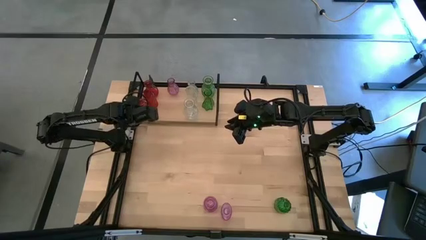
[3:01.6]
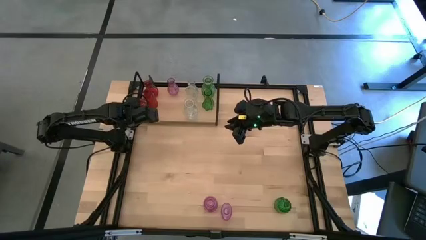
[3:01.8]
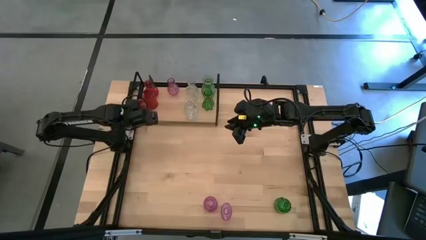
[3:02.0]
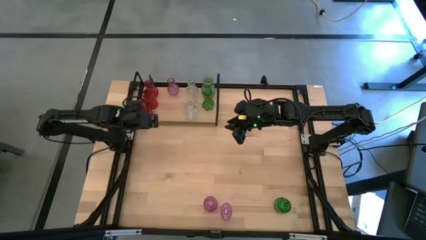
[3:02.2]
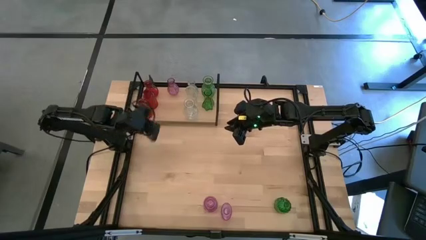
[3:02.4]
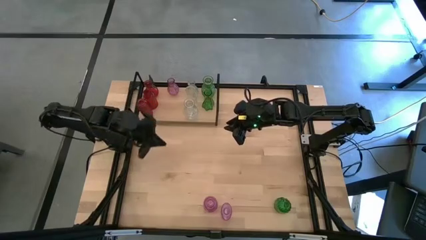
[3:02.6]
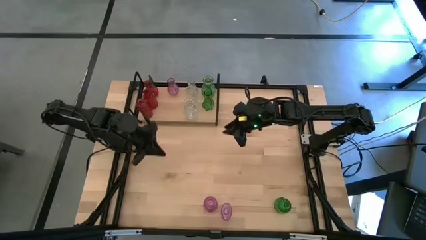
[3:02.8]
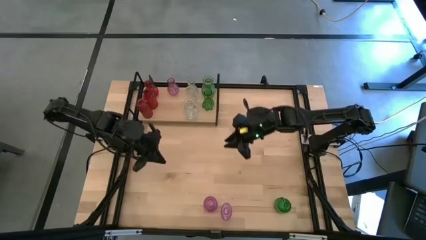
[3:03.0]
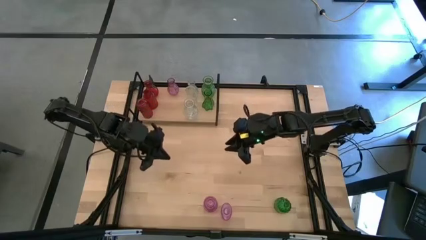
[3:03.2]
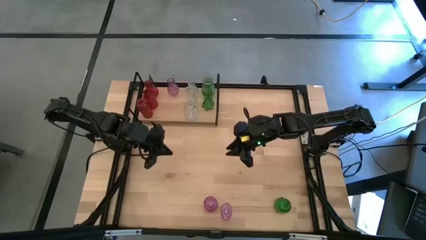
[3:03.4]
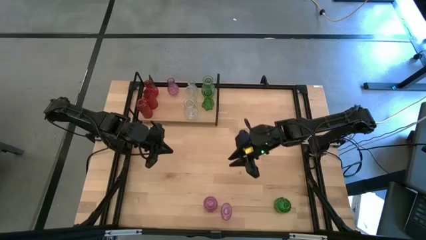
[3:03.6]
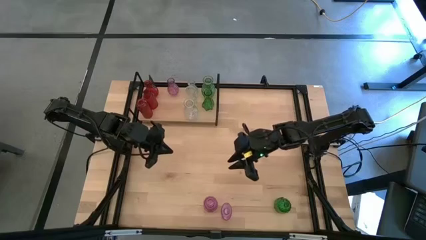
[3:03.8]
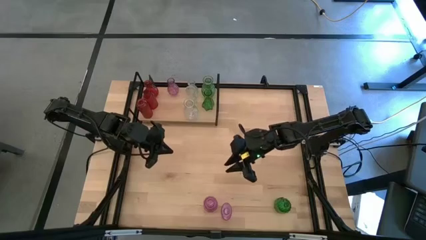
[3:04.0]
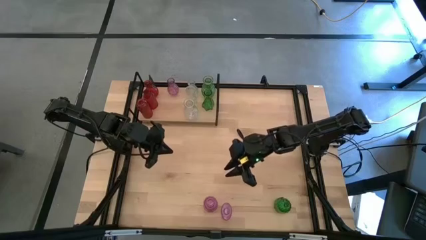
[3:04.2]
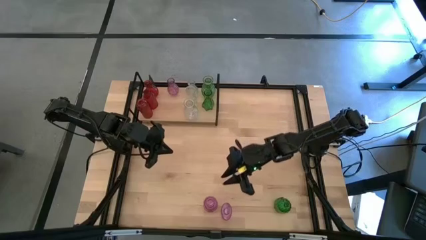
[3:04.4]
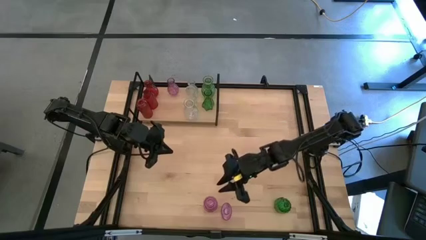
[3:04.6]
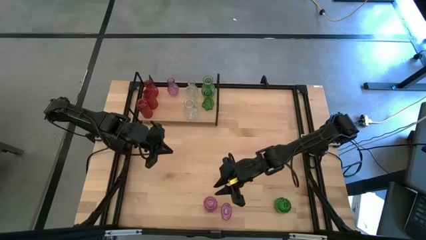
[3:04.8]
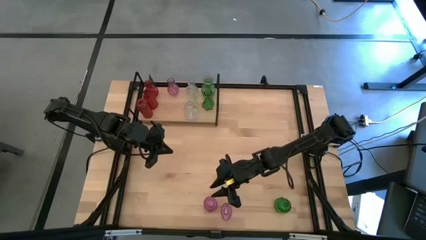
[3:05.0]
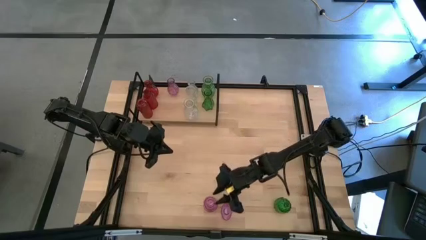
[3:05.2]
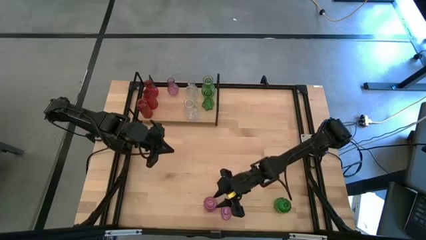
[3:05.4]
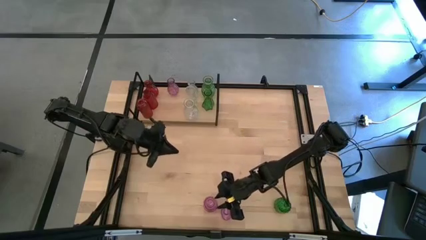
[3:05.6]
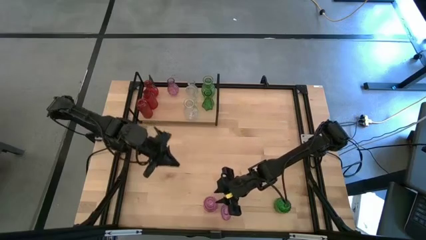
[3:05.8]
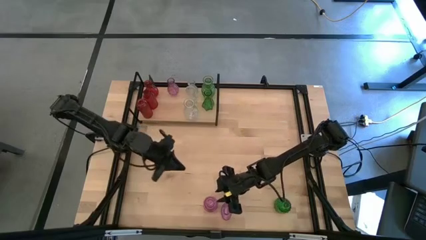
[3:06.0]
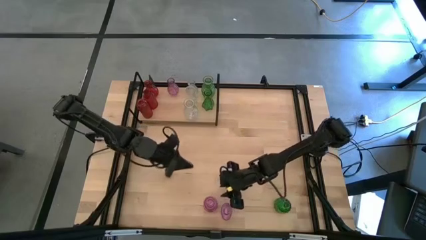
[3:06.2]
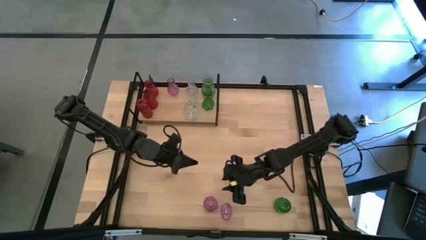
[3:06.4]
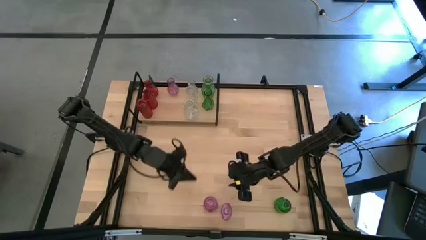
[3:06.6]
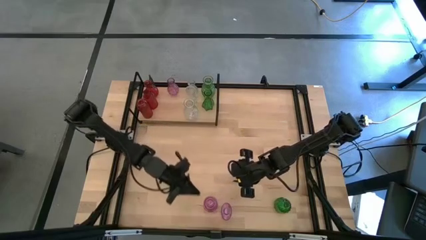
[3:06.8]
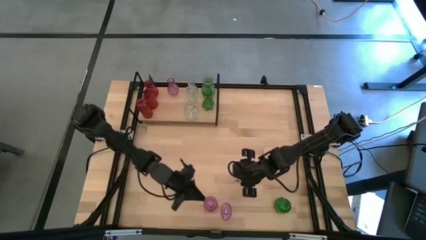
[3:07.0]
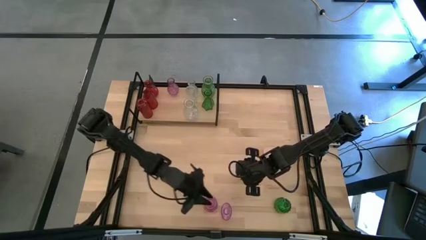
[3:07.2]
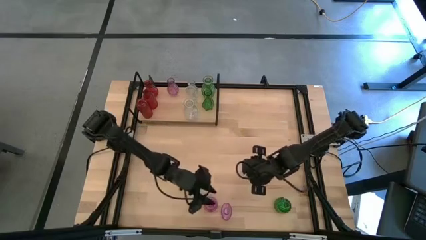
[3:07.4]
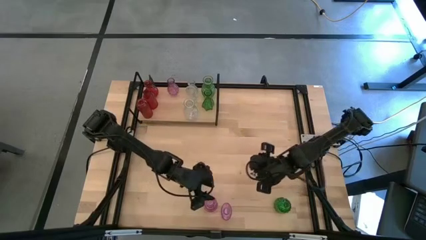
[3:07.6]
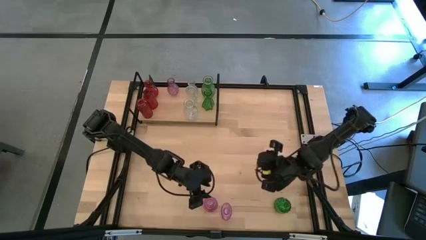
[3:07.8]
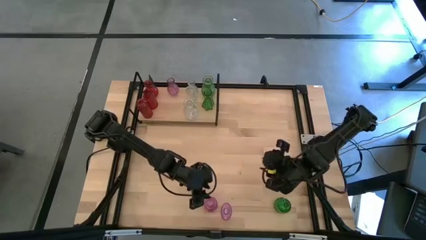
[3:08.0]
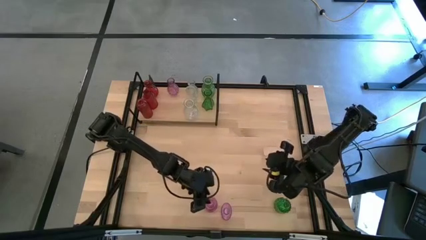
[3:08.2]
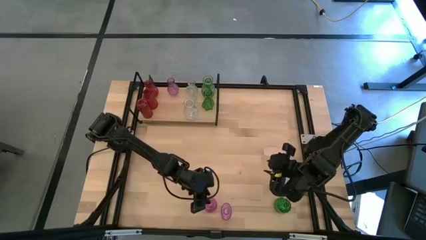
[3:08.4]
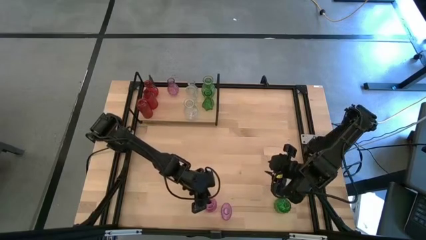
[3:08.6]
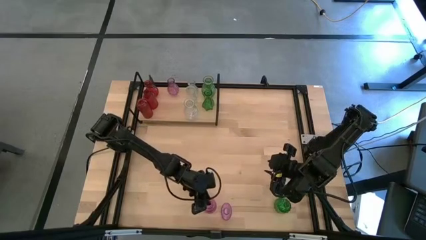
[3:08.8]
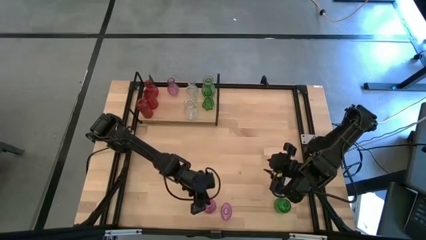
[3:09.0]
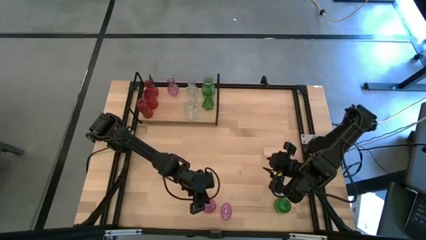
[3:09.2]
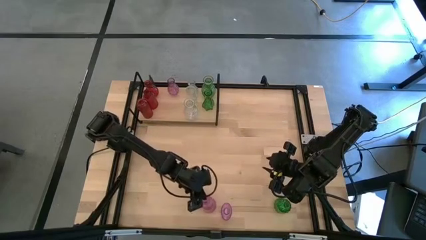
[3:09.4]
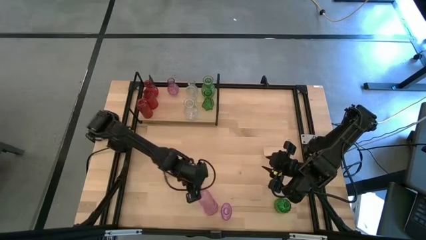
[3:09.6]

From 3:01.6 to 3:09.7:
Task: sort vases onto shelf
Put the left purple vase on the shelf aligned with the other purple vase

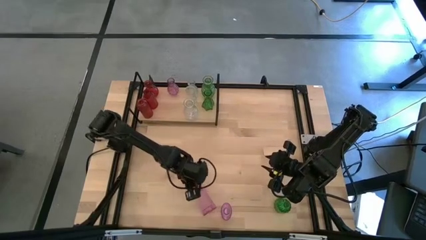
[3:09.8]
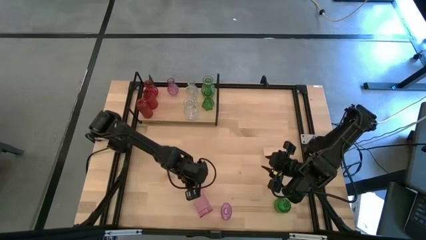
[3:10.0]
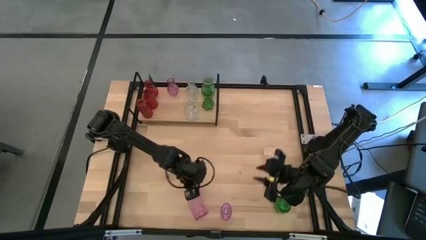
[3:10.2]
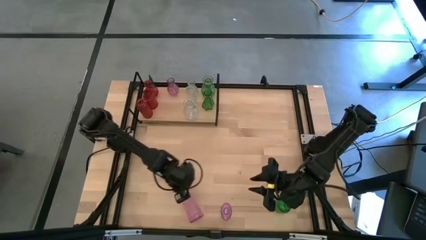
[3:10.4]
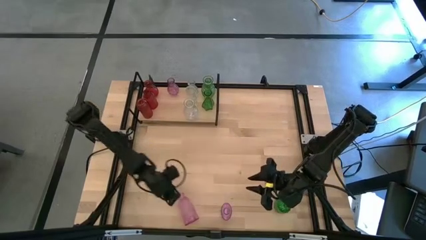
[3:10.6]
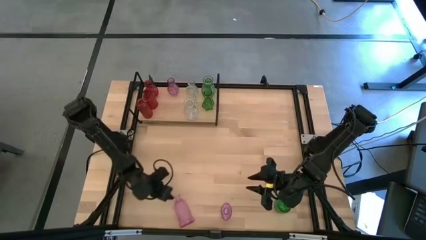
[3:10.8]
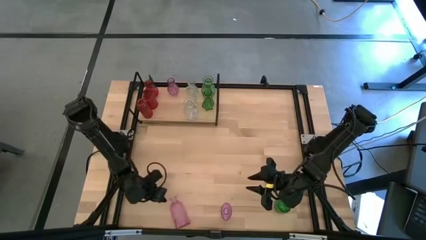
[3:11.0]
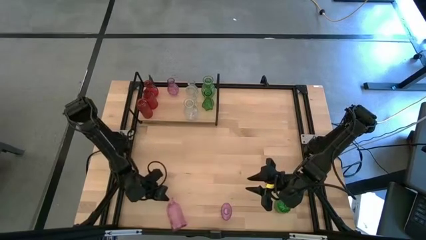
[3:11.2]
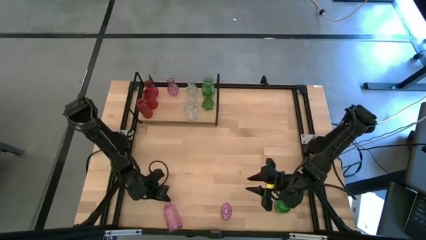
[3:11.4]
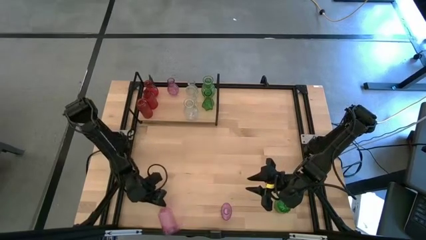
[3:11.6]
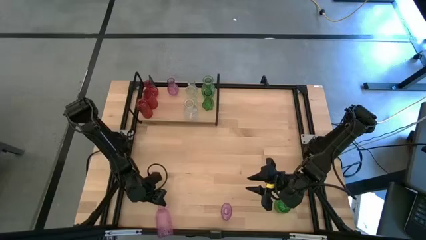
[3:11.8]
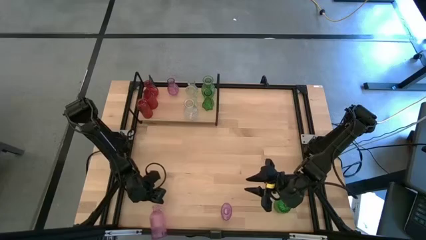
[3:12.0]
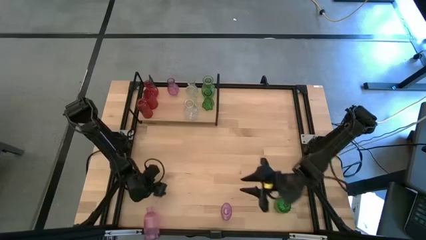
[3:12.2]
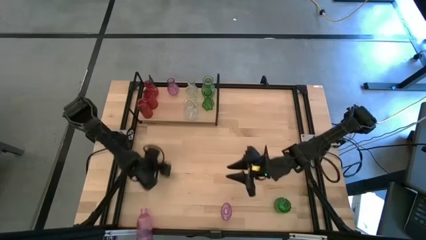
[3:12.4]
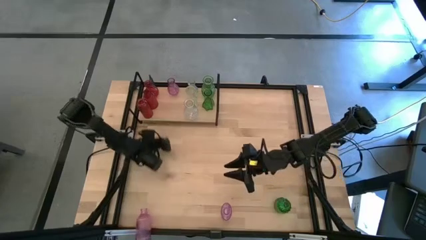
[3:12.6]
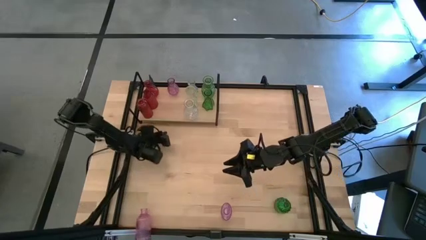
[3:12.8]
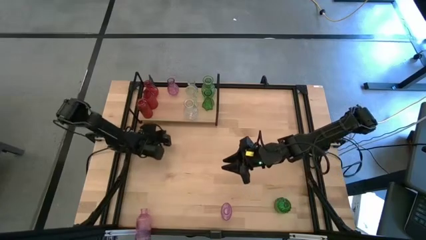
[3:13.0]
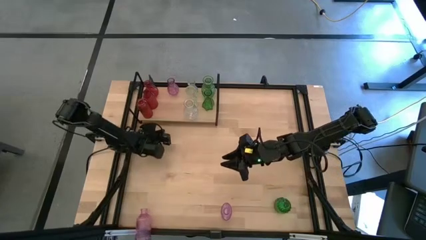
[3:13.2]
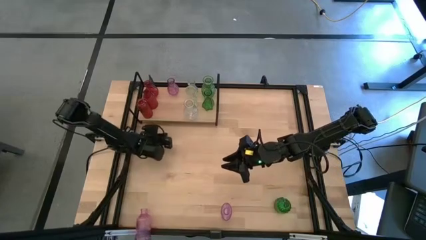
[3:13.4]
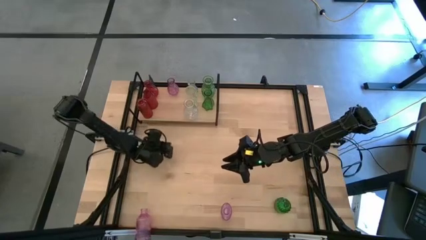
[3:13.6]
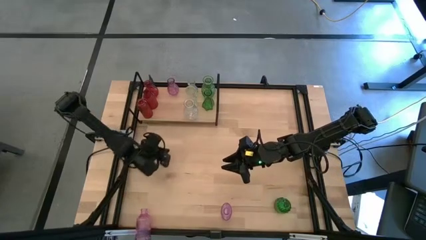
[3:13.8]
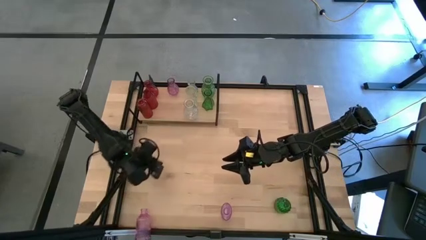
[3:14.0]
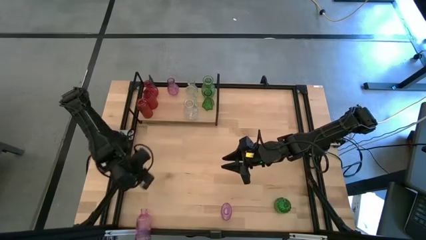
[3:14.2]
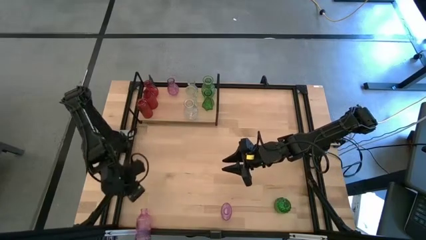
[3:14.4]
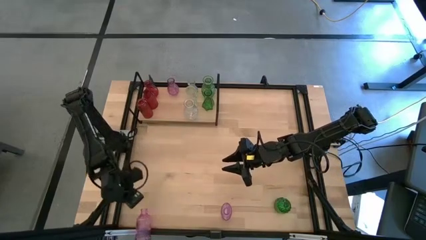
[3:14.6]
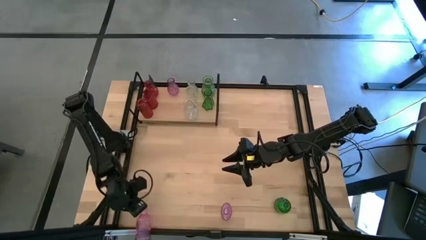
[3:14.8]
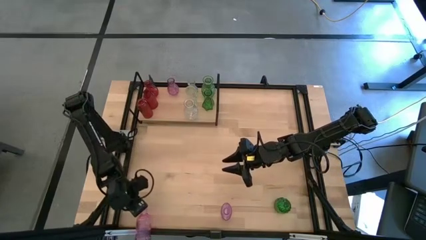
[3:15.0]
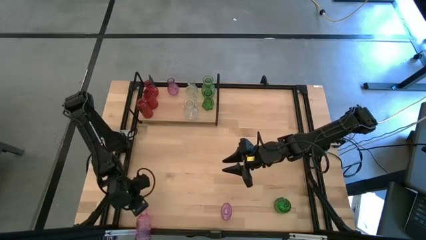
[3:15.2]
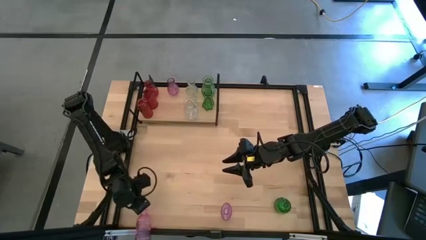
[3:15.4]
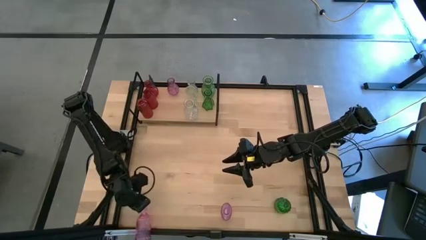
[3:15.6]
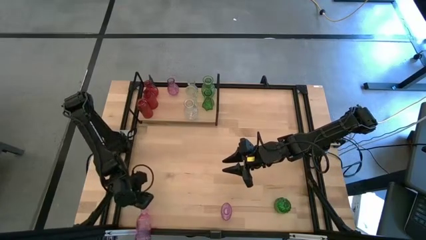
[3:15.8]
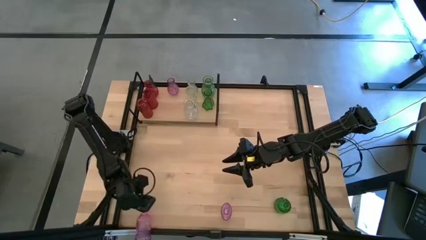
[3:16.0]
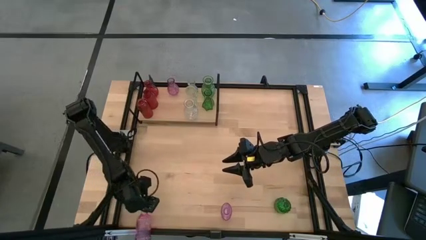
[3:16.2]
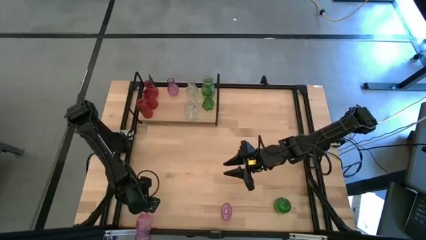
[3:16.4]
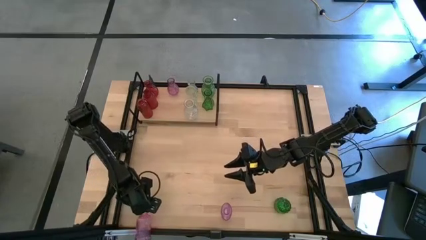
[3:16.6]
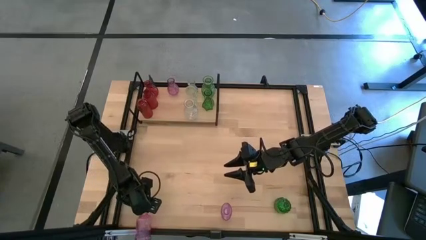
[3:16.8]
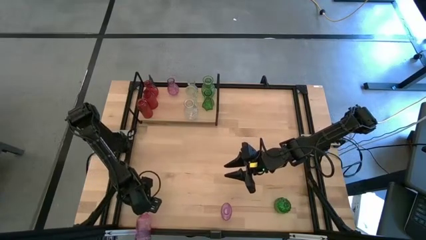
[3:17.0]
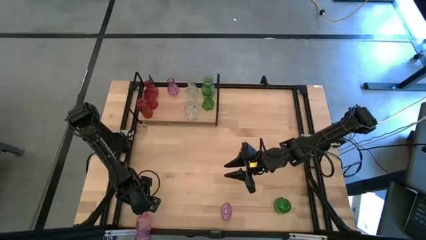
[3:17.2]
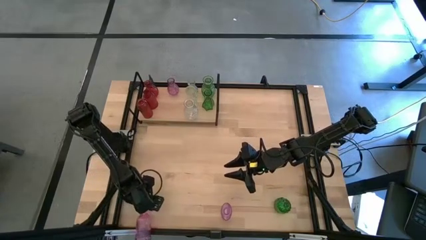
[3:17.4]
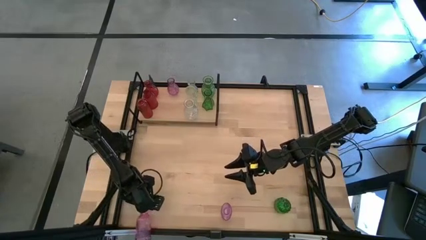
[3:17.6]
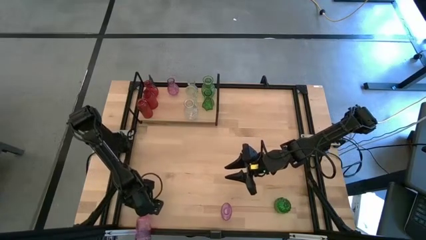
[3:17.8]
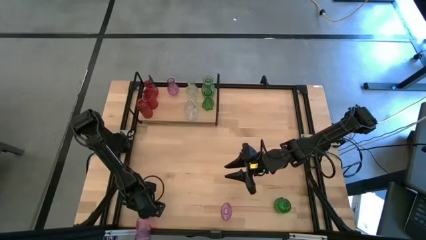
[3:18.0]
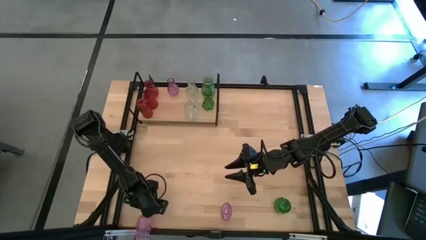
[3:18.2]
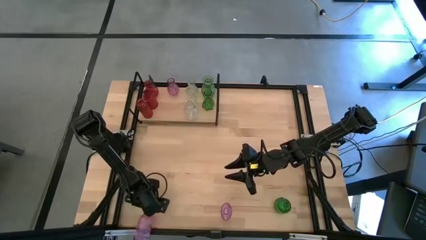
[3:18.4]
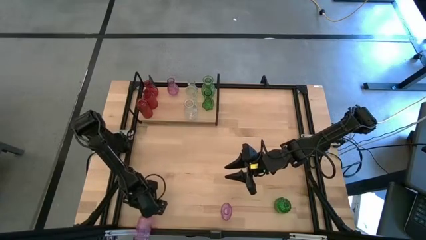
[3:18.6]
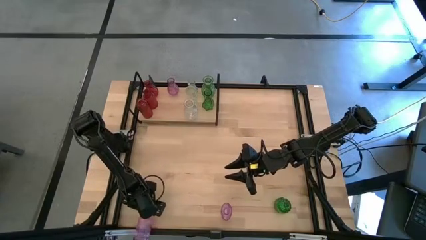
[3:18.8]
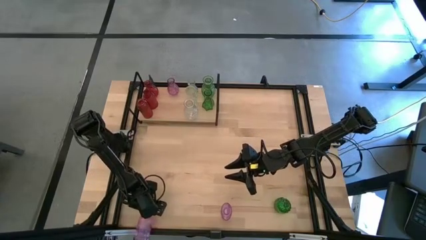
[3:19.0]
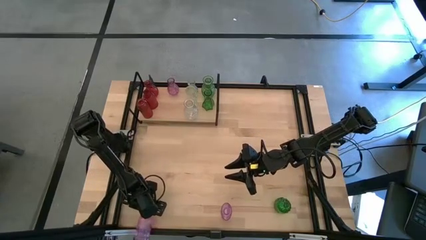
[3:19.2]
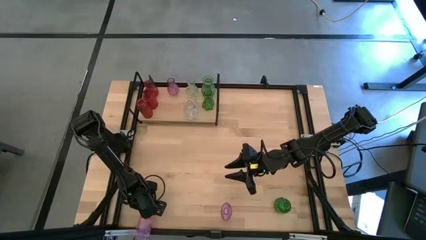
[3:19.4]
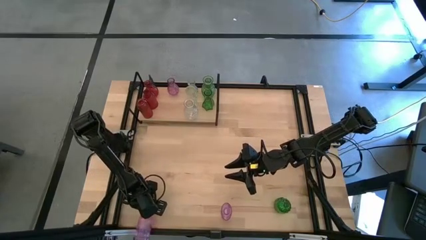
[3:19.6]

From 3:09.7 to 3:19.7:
Put the left purple vase on the shelf aligned with the other purple vase
